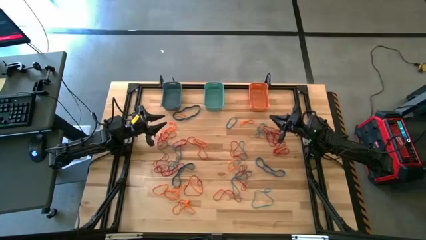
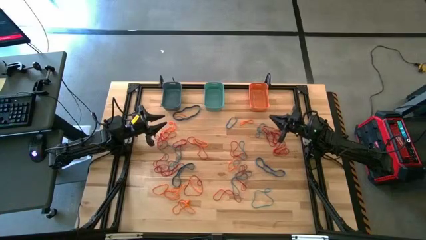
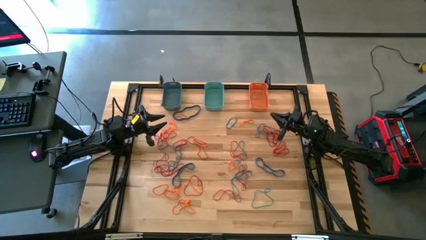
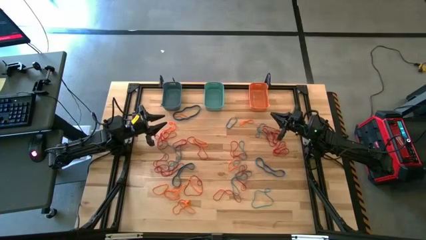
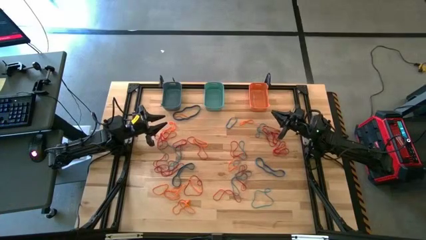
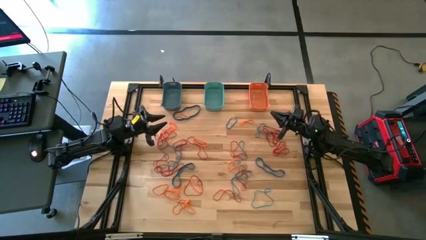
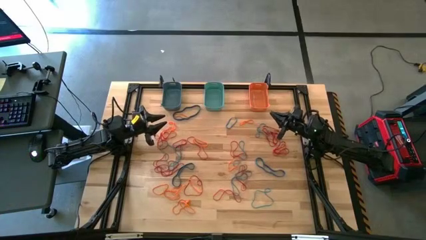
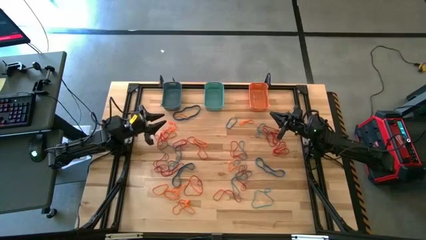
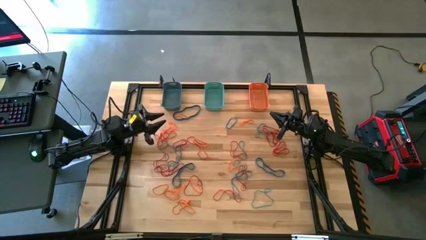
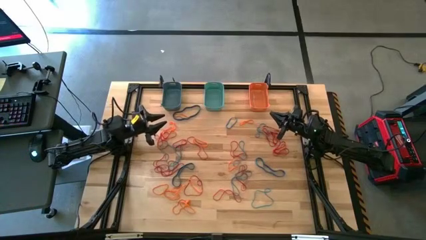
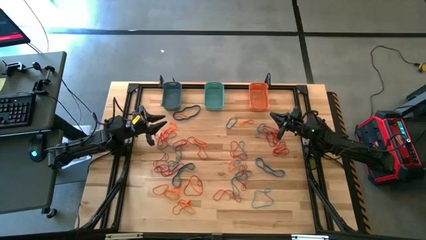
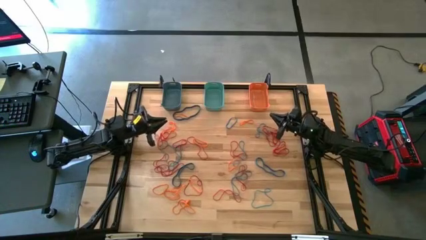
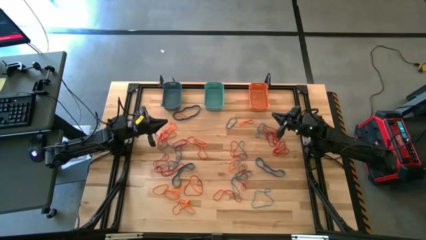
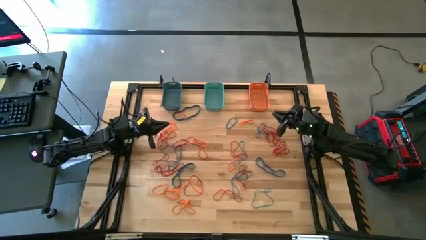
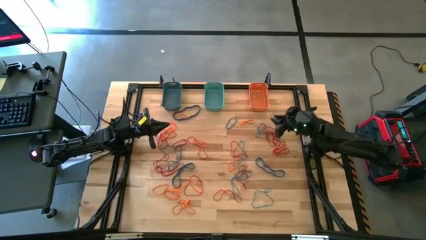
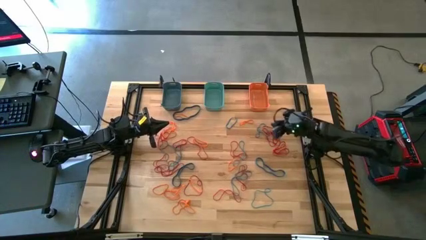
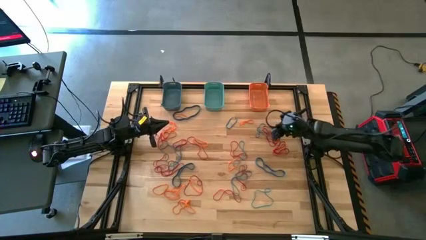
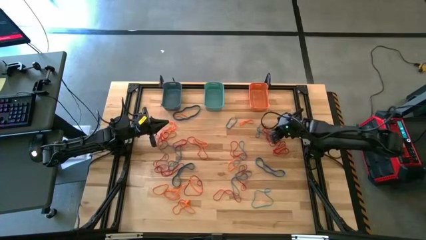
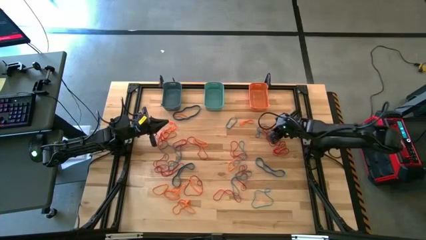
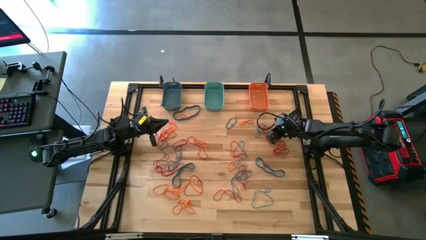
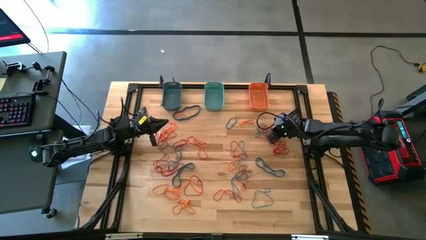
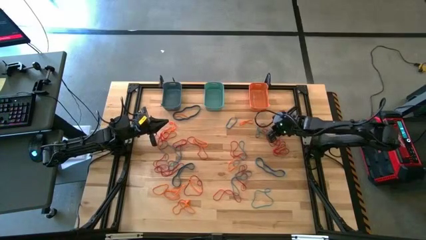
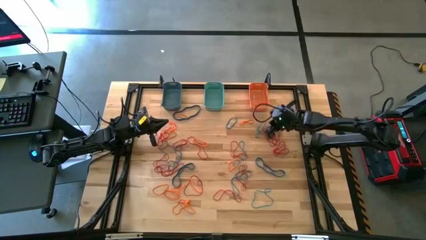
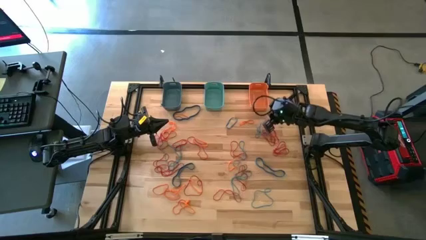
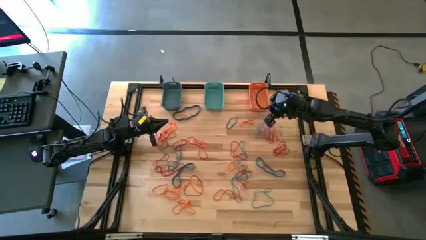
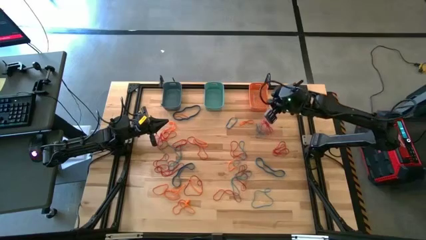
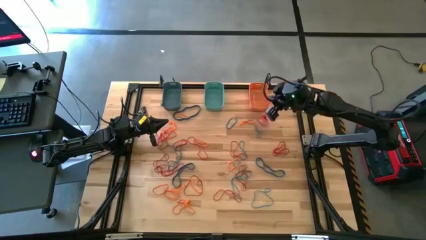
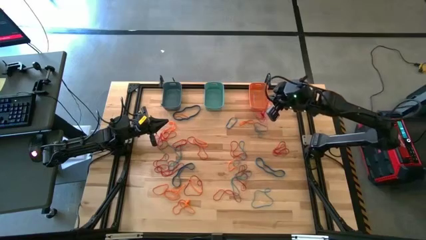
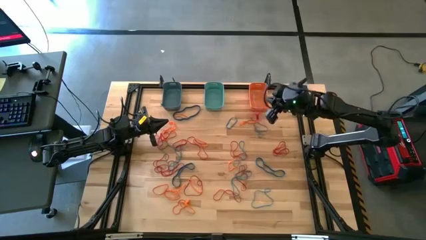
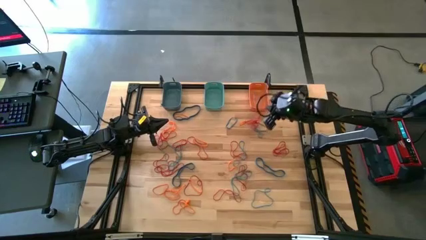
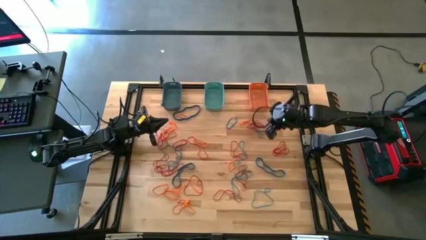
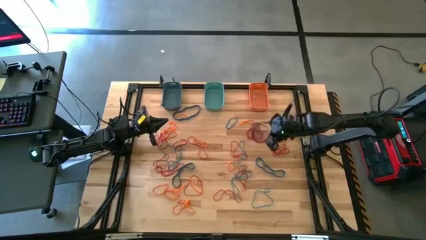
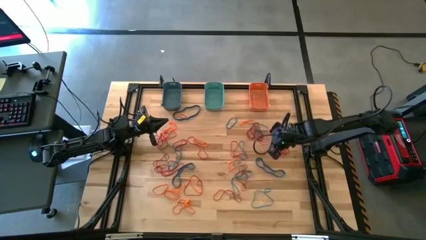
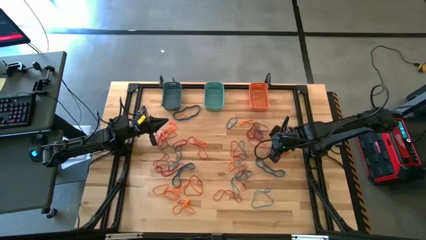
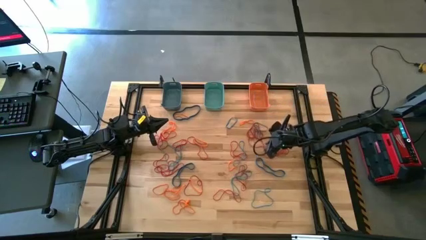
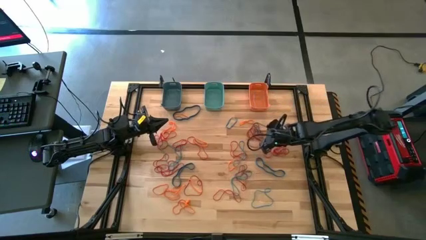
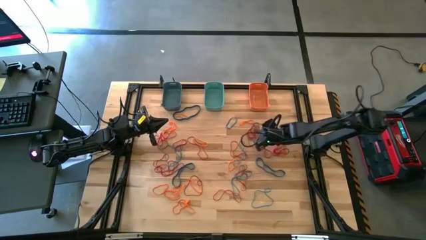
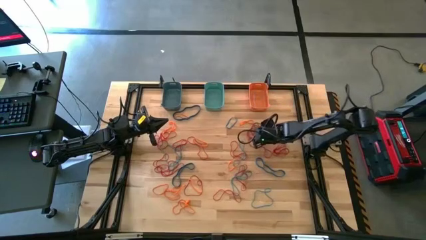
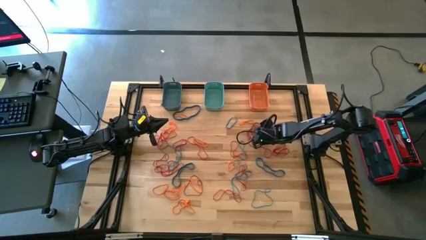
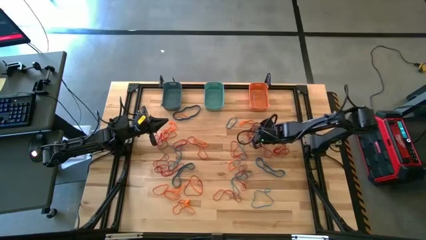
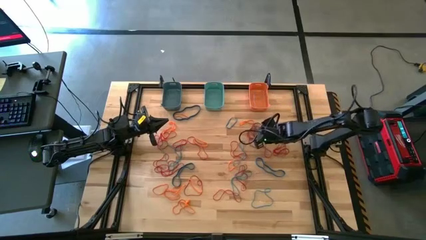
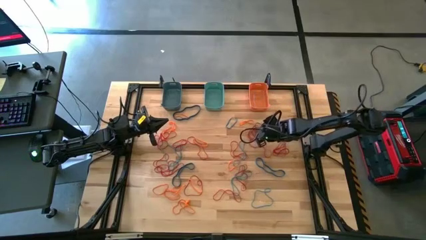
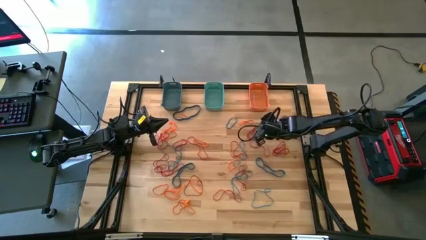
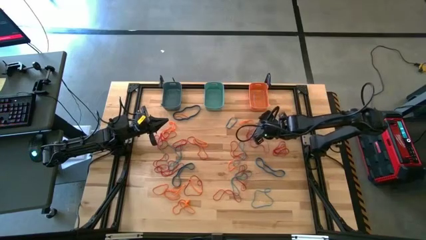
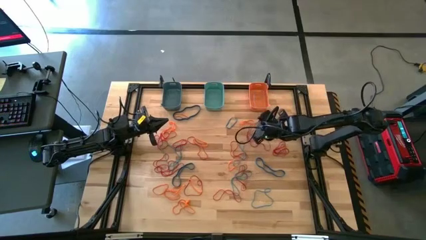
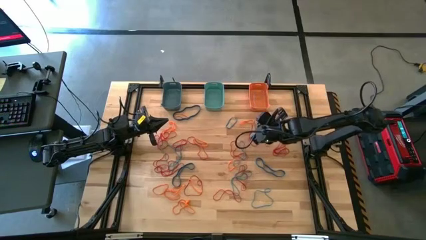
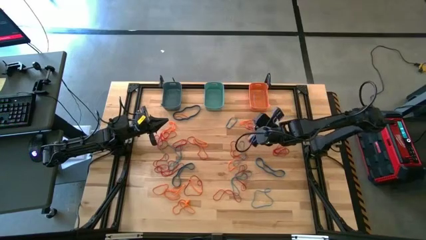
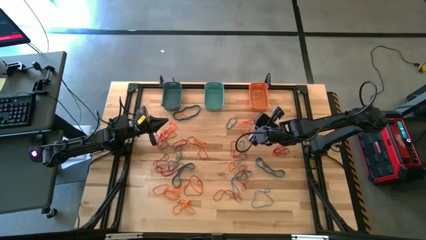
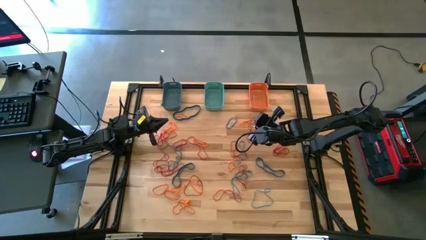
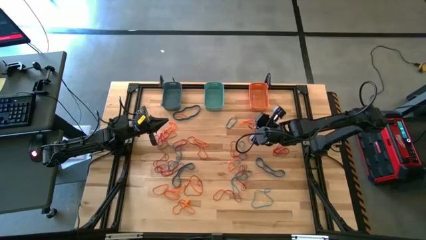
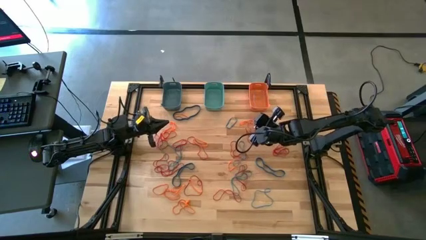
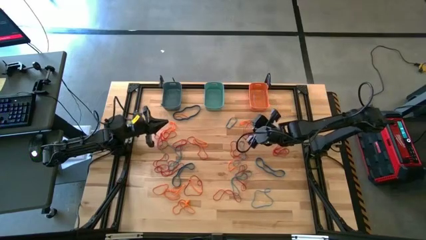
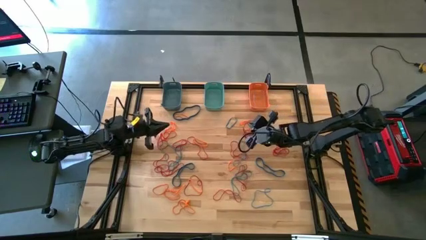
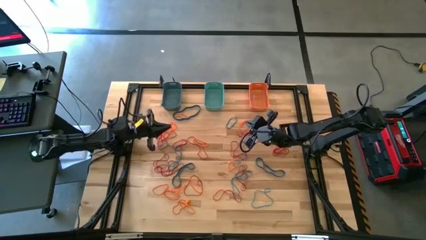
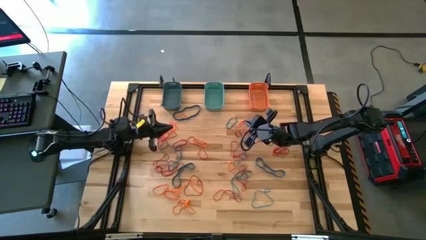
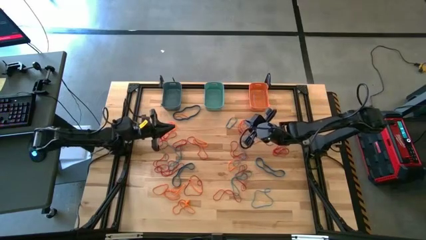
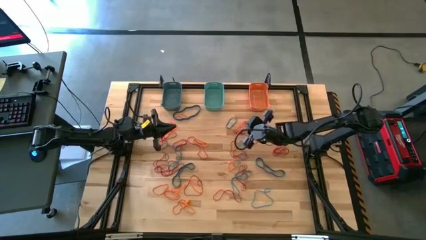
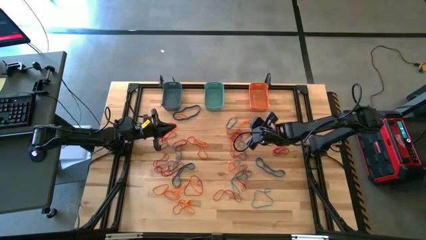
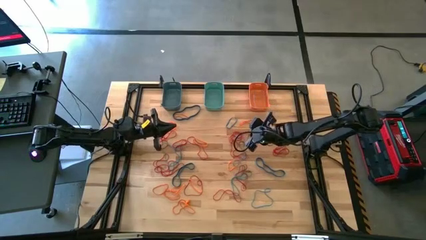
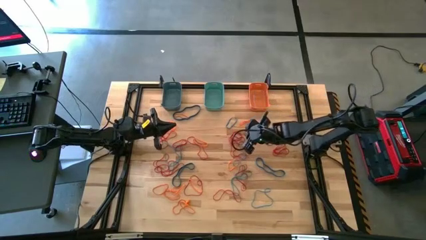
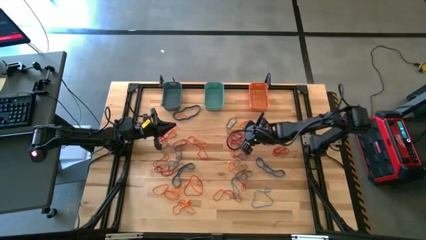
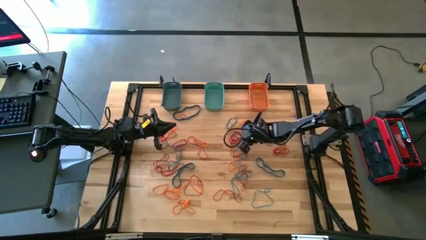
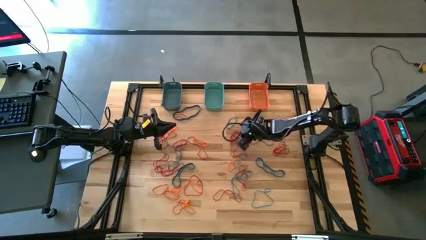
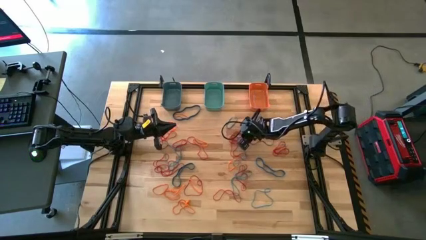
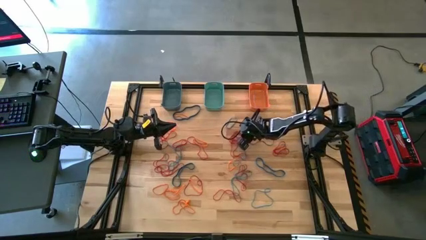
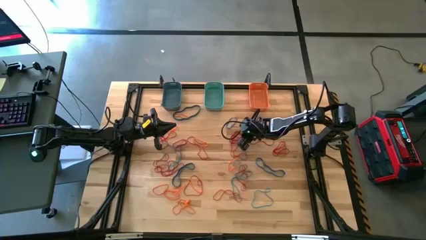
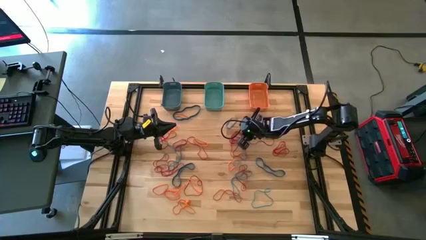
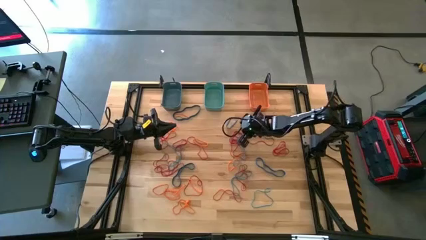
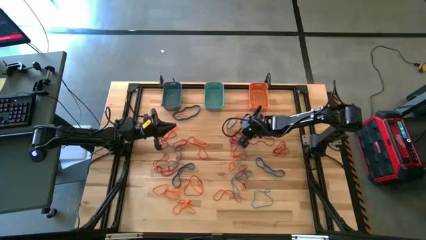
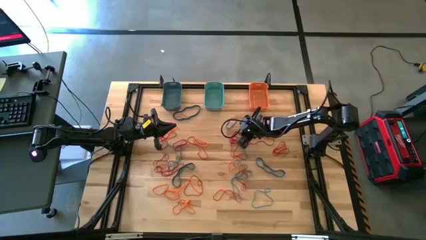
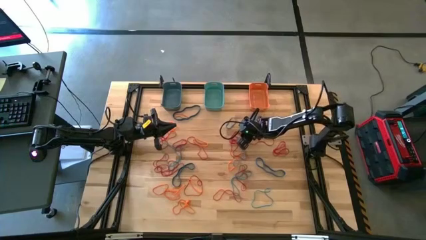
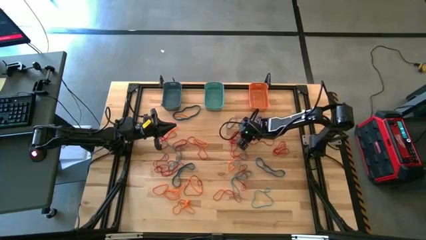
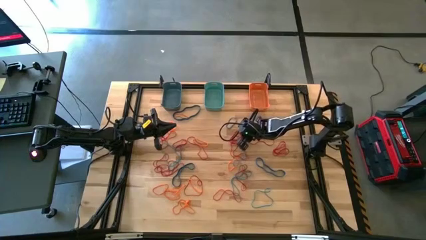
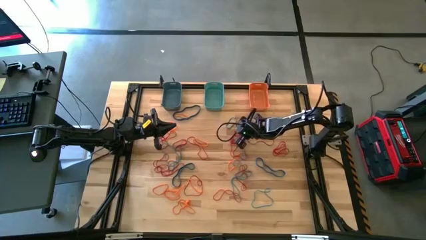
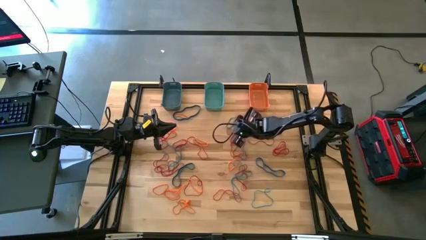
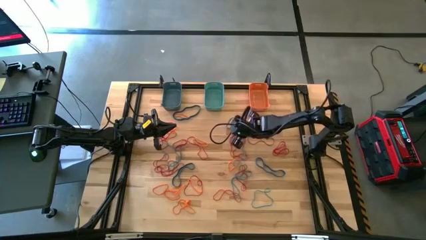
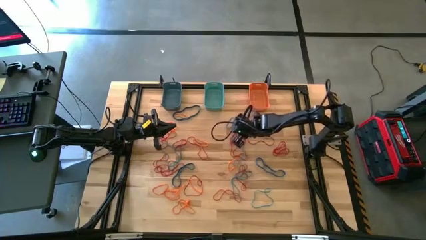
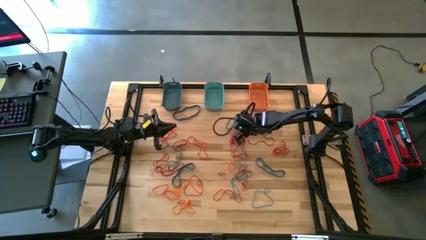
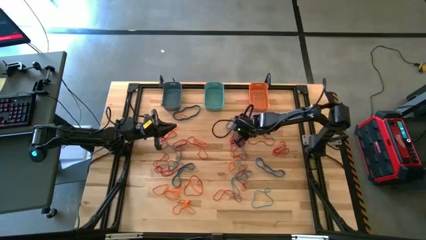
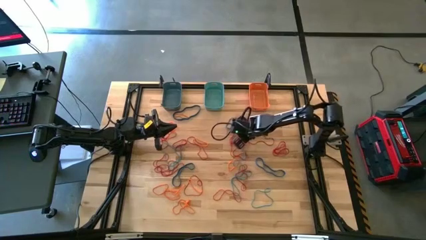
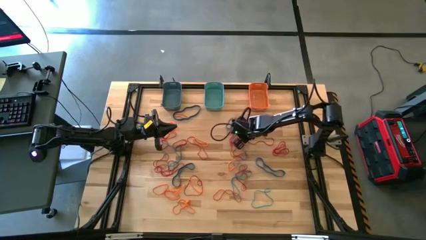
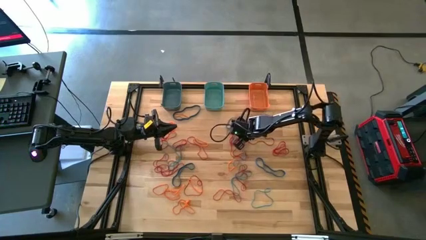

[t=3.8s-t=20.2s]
Task: Sort rubber bands into baskets
Put the red rubber band into the blue bin
